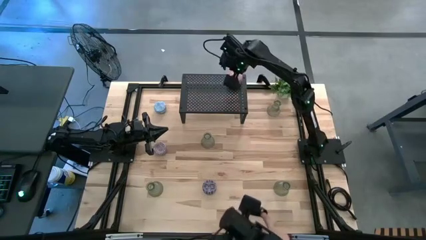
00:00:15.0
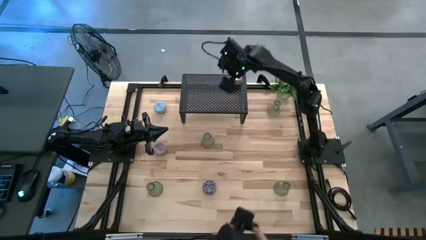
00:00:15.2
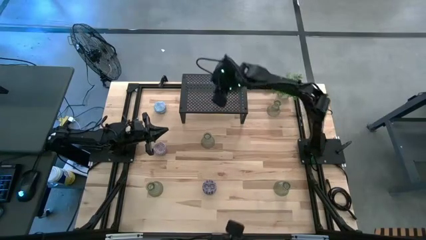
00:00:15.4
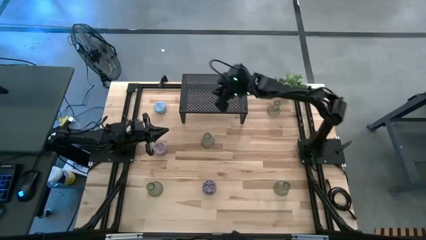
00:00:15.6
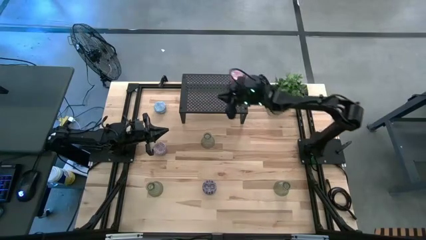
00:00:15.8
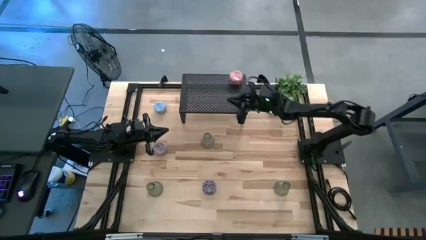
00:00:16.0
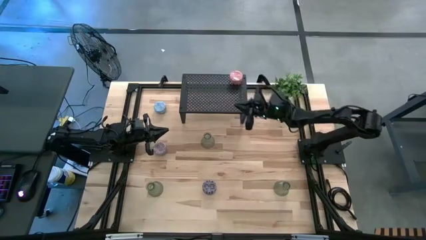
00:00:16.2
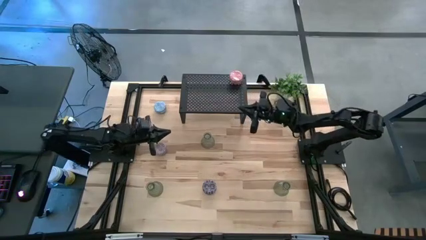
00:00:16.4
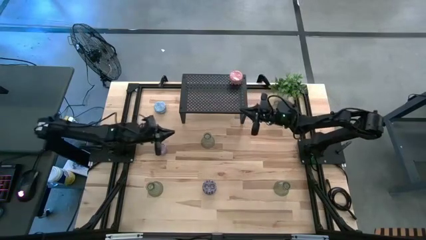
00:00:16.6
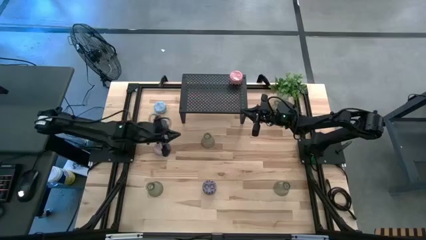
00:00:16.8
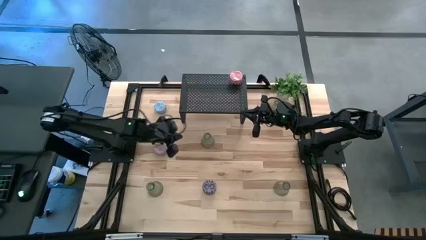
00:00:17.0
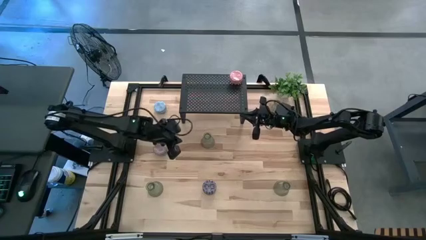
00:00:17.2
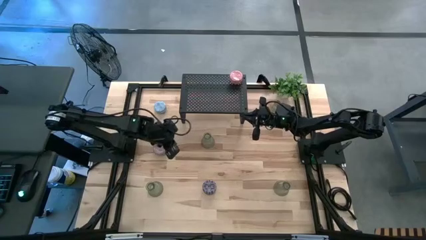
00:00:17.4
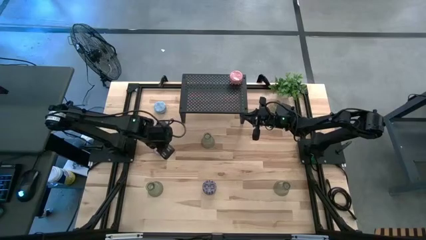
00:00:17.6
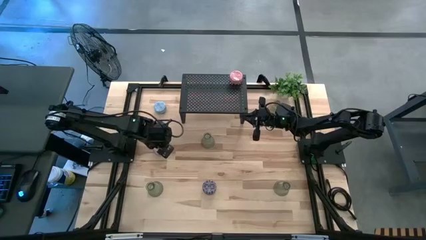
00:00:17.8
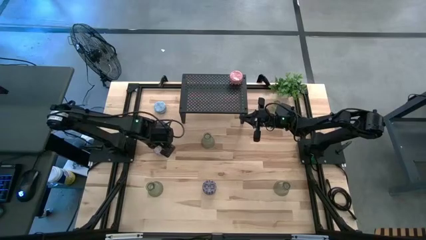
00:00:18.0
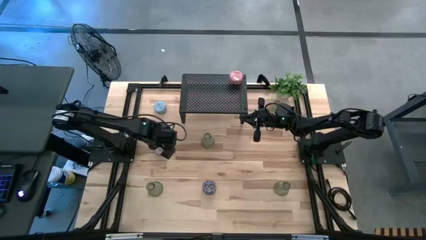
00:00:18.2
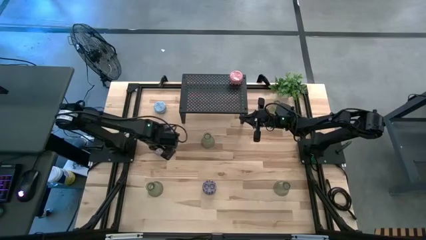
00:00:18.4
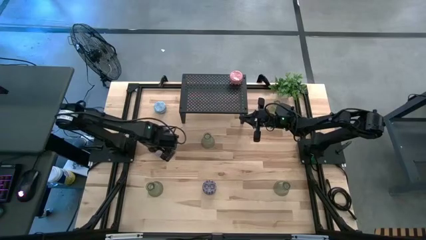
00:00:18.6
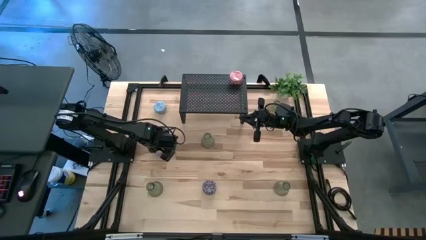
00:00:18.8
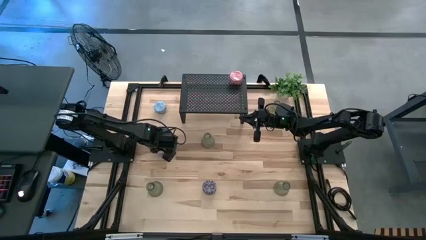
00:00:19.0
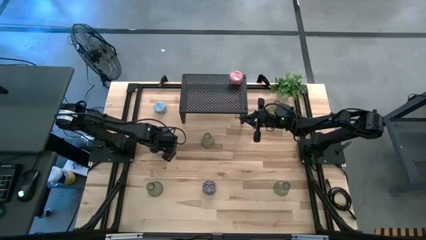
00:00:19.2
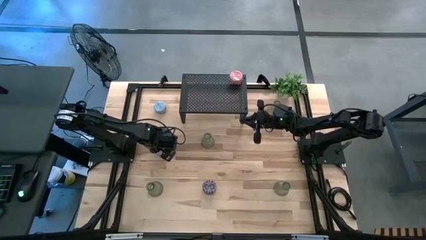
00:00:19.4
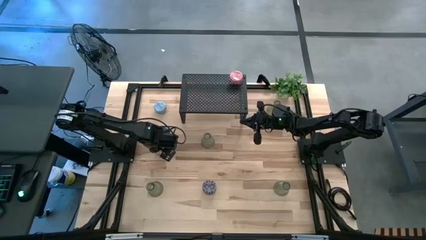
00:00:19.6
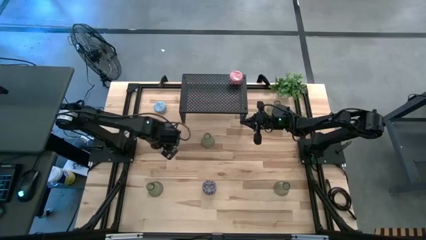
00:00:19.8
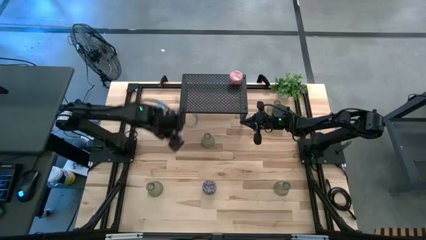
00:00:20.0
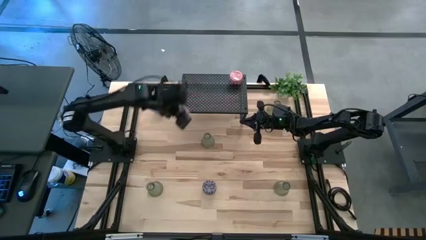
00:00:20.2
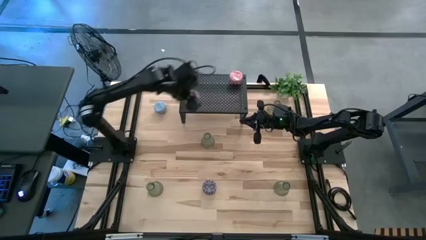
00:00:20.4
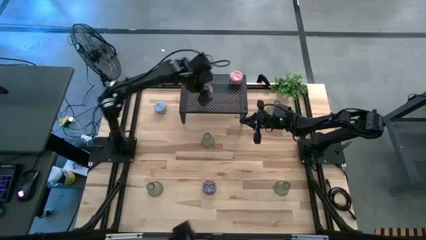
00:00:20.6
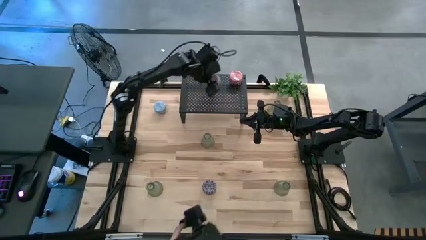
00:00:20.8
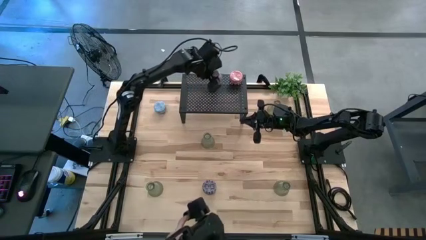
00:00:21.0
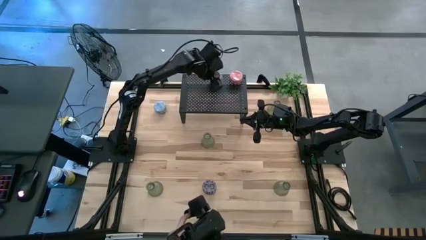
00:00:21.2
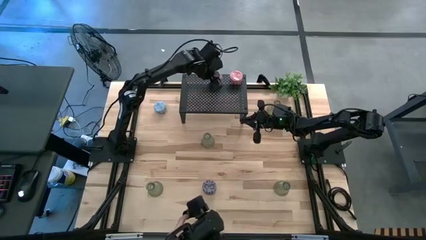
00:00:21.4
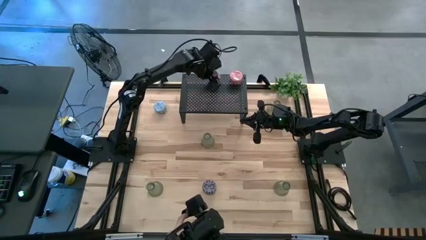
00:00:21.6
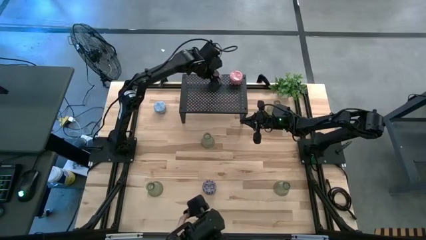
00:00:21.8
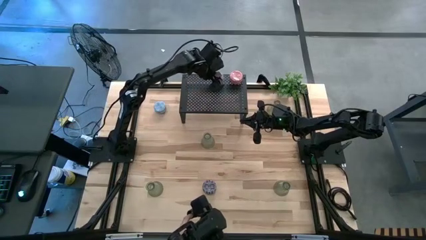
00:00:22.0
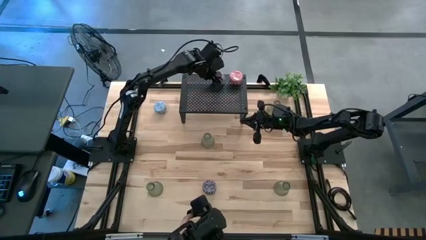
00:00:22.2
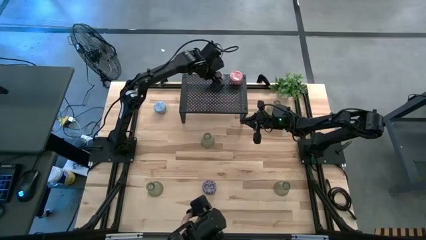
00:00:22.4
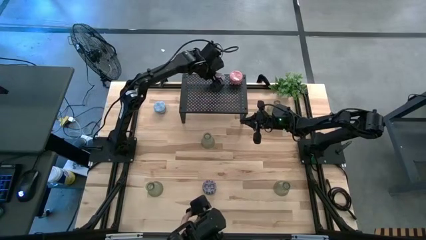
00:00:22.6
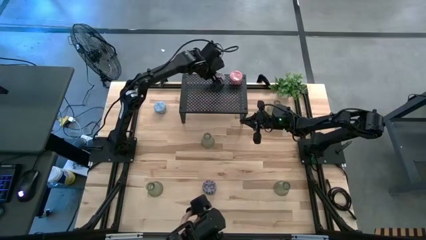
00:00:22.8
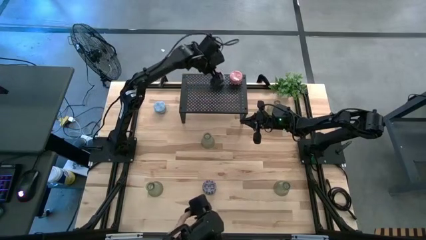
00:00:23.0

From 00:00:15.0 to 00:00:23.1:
Task: Pick & Place candle stick holders
Align the red scented candle with the other scented candle on the shelf

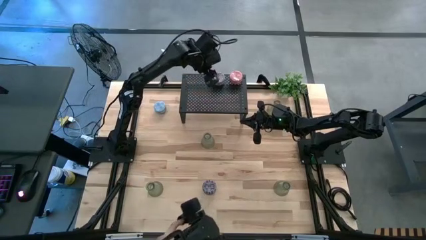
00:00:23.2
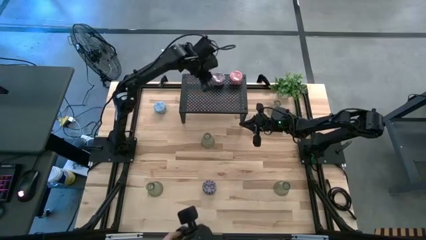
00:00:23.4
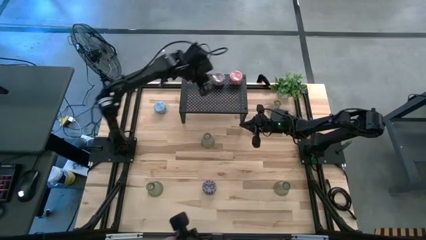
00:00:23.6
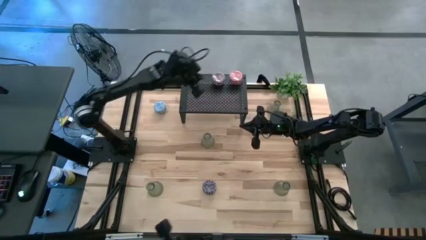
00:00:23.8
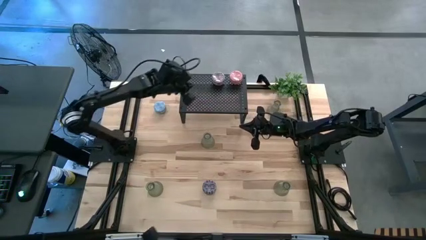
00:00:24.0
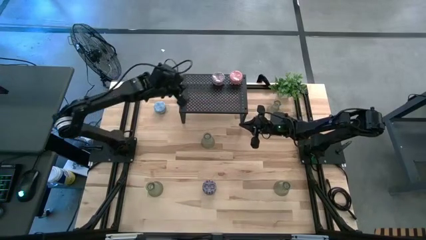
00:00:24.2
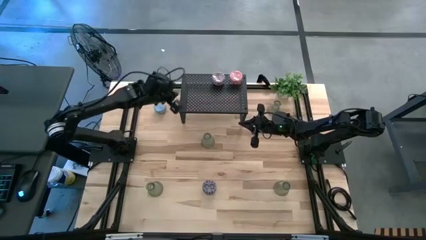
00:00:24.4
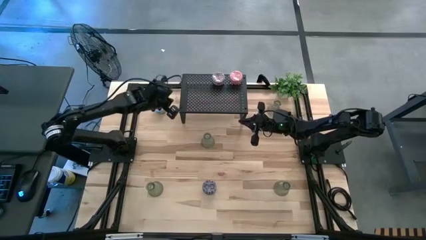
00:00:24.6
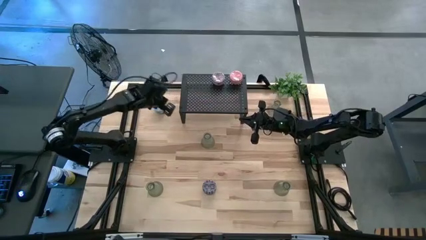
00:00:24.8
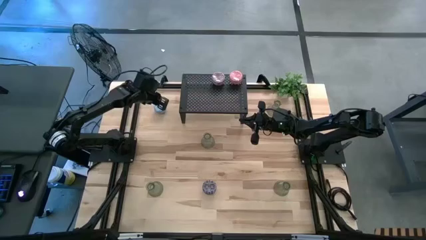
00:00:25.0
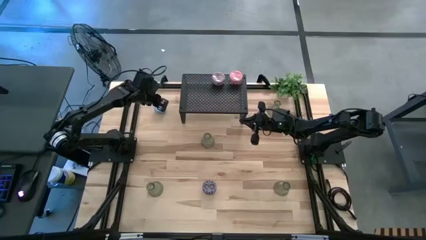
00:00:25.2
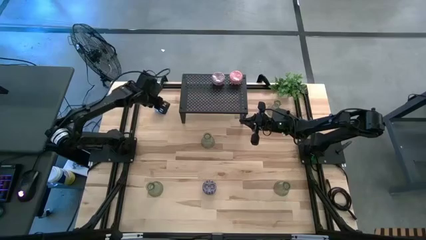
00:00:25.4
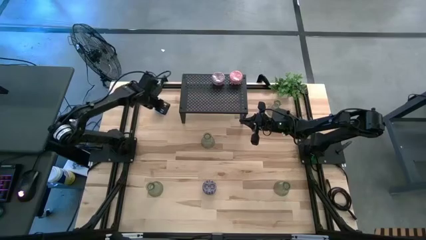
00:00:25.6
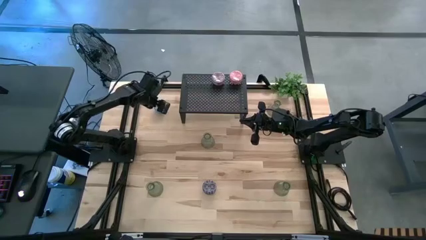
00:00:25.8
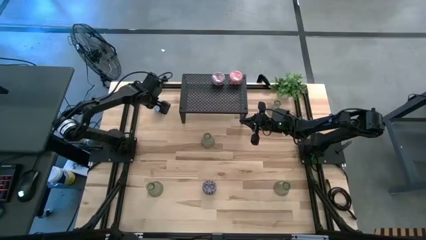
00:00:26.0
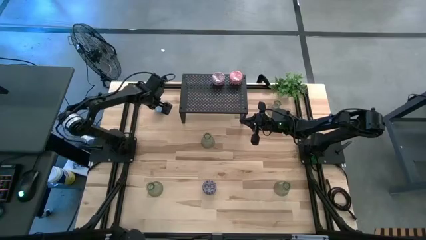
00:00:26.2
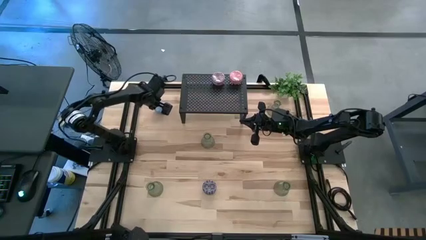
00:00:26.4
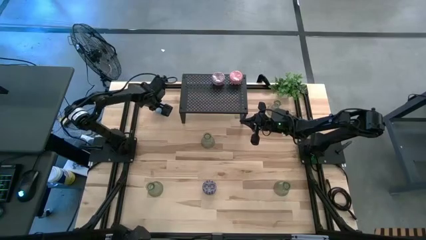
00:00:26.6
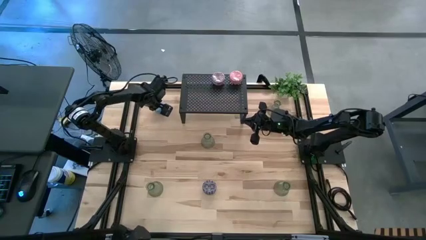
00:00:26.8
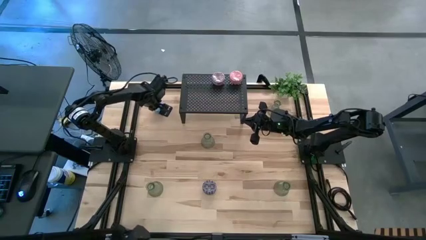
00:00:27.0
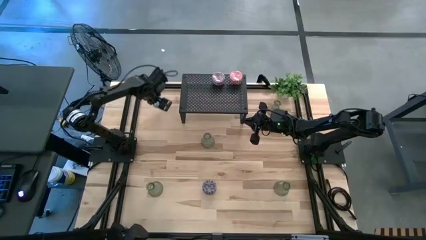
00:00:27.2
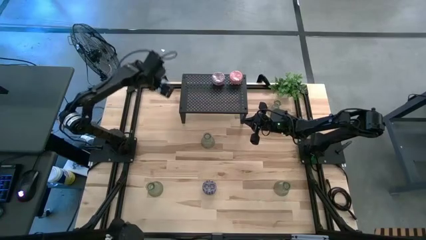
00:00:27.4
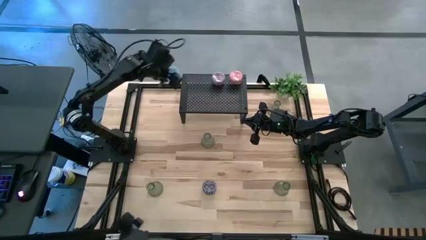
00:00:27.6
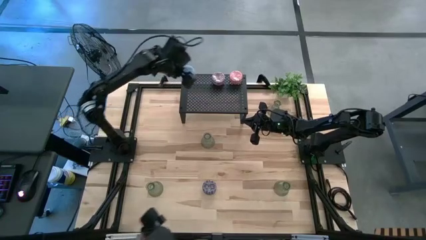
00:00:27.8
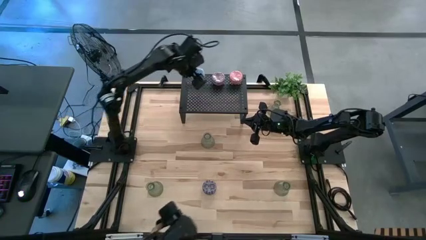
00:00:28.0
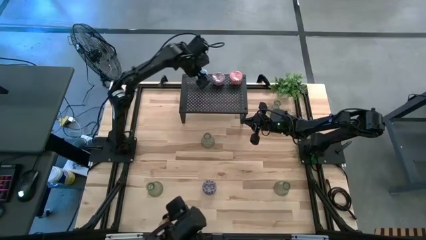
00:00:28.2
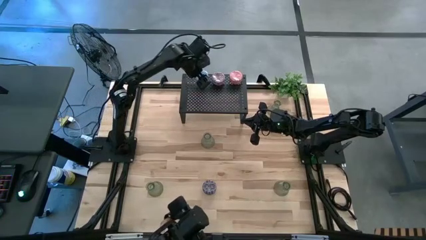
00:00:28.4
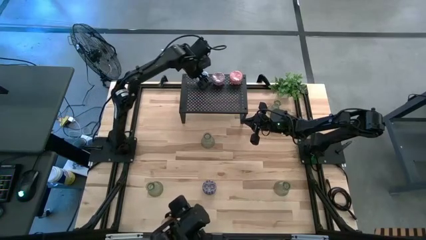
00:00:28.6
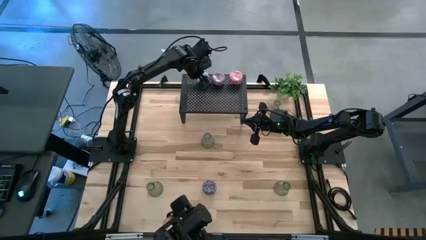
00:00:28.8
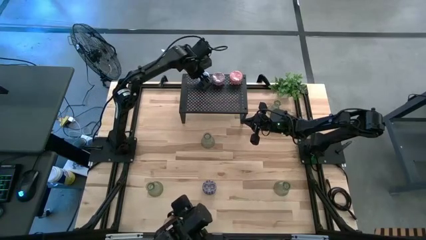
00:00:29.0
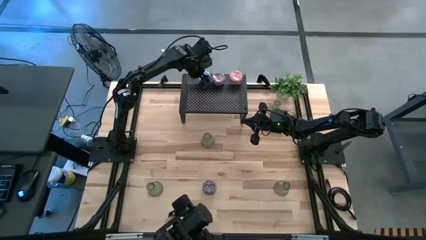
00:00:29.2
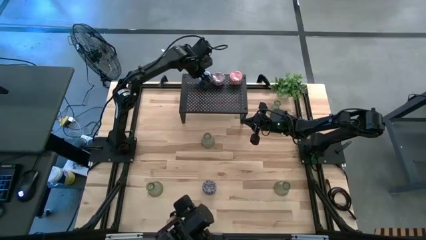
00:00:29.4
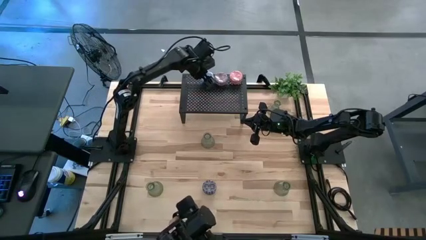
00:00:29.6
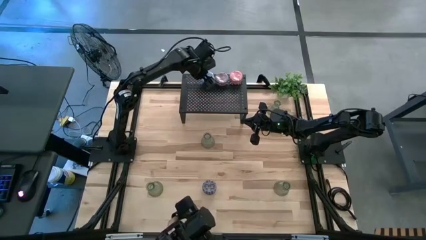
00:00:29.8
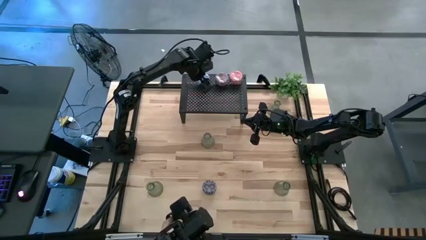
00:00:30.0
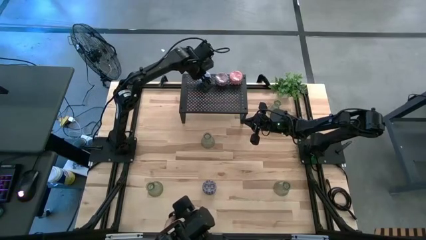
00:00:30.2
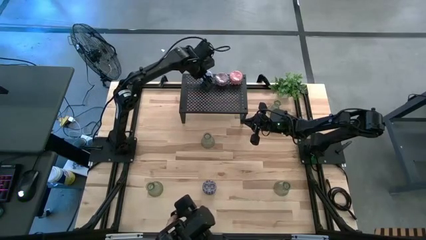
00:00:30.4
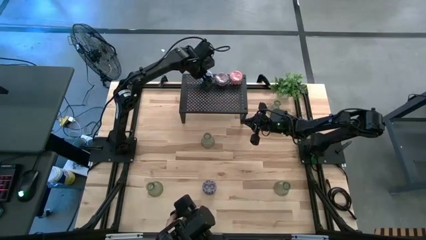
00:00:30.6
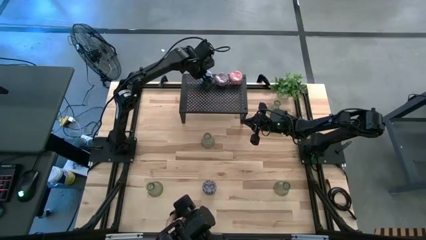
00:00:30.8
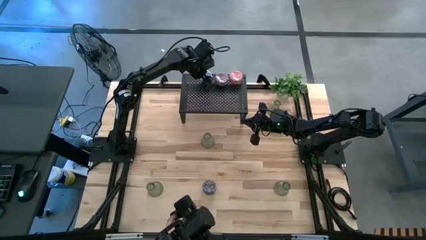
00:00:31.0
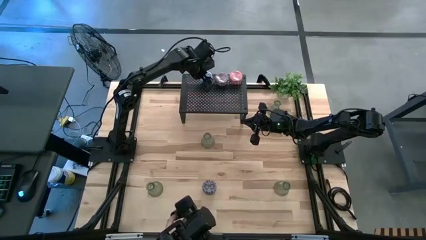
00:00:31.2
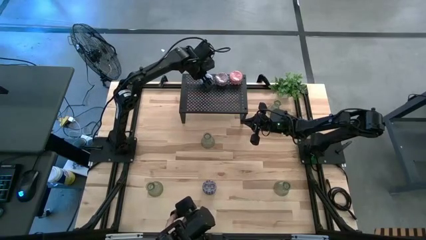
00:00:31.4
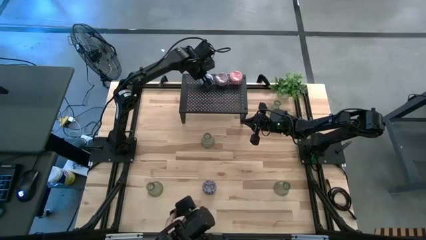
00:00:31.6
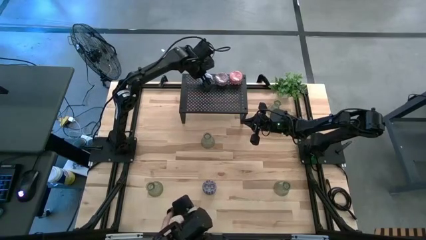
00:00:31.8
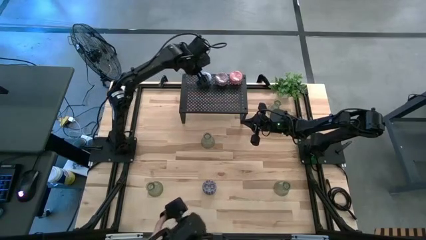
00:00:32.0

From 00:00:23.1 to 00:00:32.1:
Align the blue scented candle with the other scented candle on the shelf
